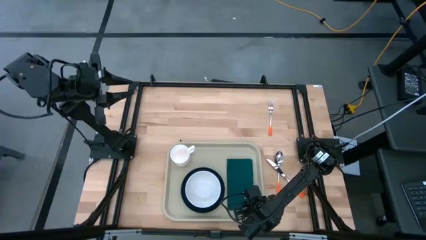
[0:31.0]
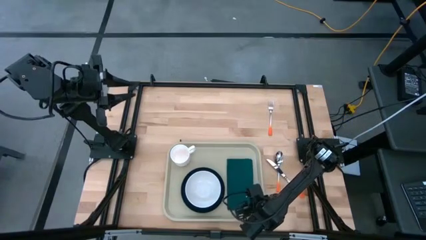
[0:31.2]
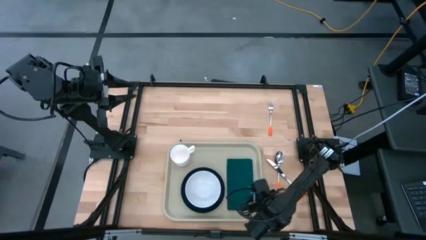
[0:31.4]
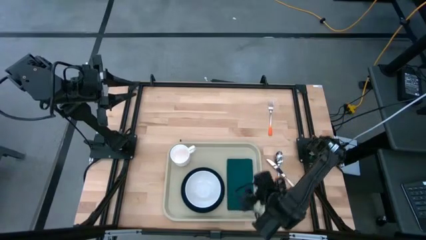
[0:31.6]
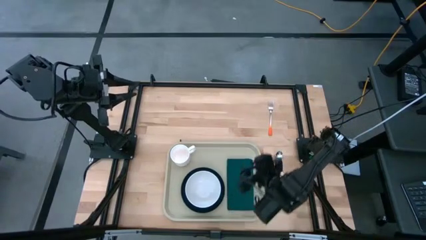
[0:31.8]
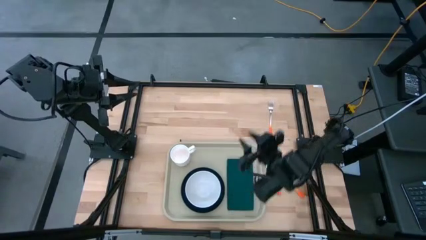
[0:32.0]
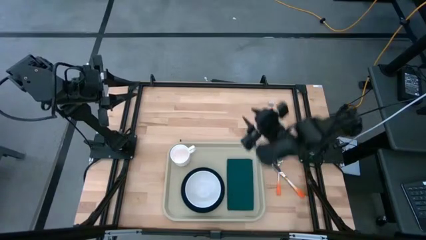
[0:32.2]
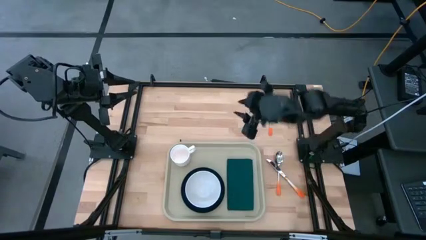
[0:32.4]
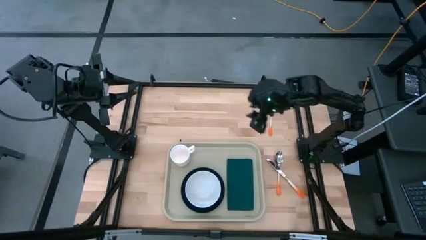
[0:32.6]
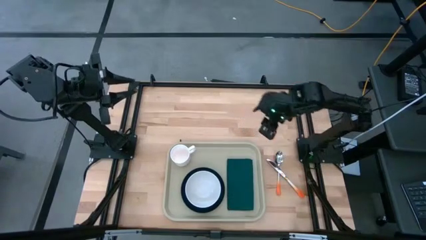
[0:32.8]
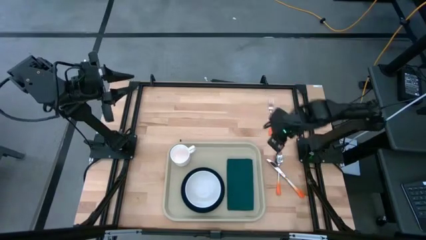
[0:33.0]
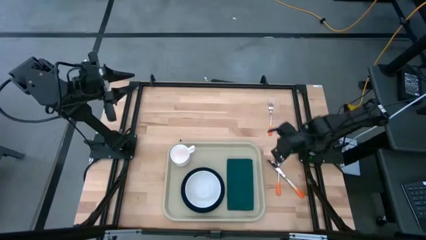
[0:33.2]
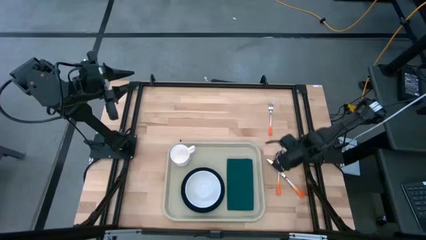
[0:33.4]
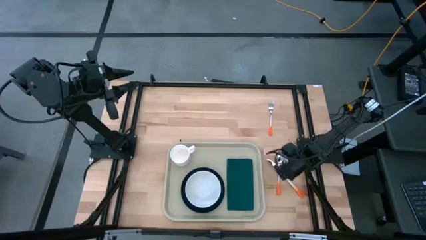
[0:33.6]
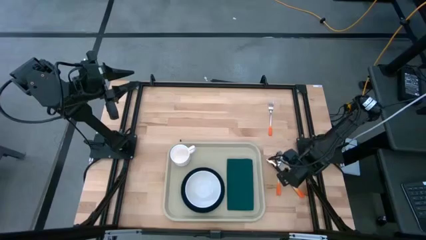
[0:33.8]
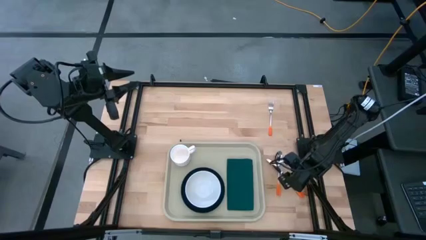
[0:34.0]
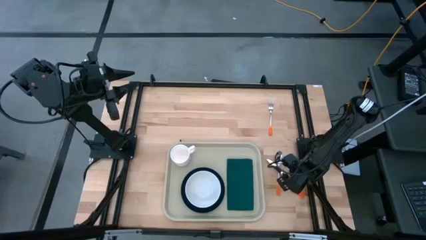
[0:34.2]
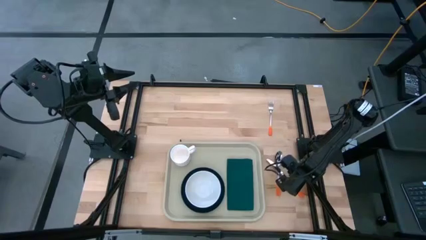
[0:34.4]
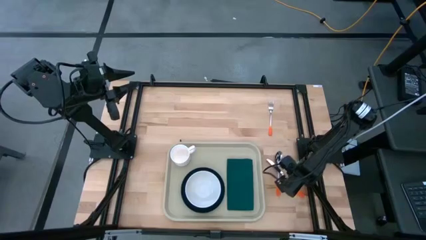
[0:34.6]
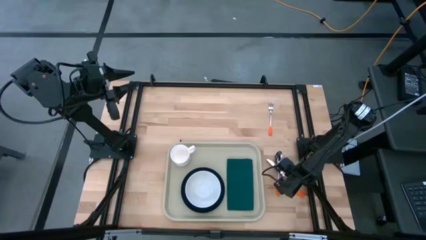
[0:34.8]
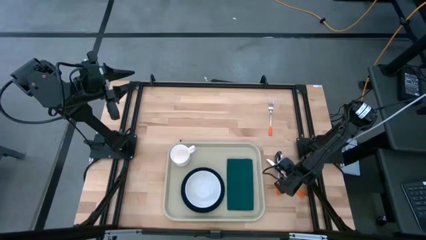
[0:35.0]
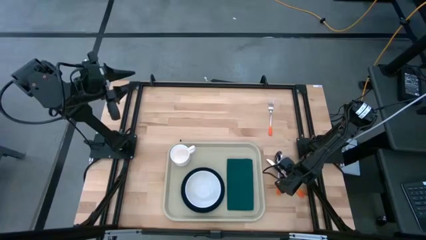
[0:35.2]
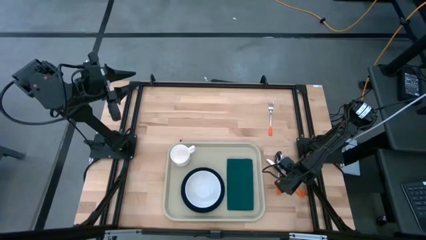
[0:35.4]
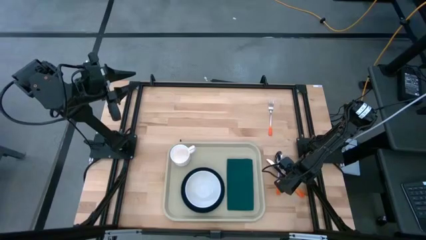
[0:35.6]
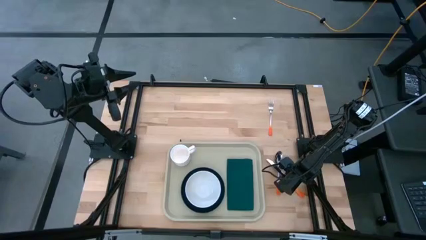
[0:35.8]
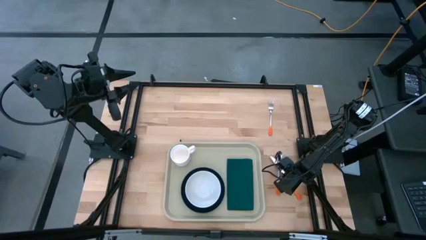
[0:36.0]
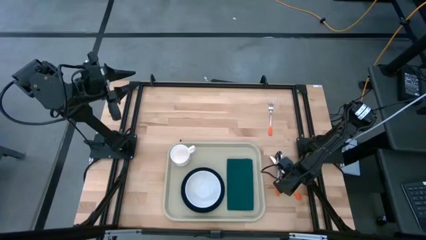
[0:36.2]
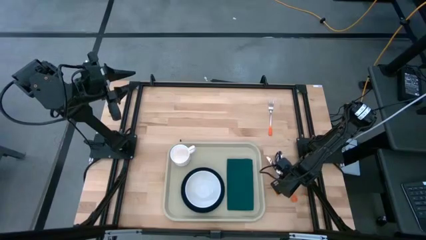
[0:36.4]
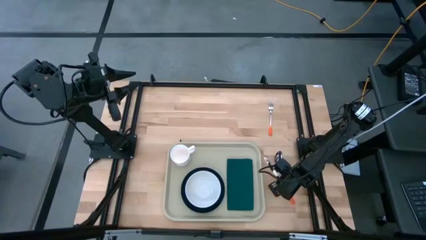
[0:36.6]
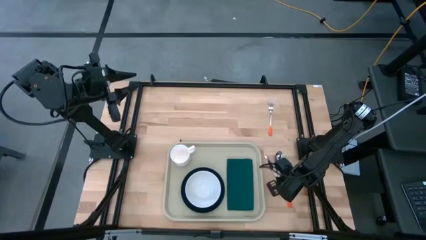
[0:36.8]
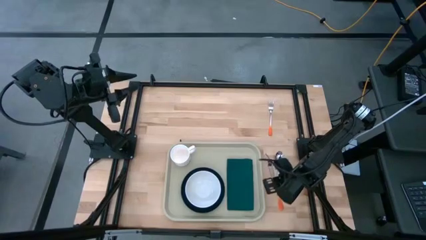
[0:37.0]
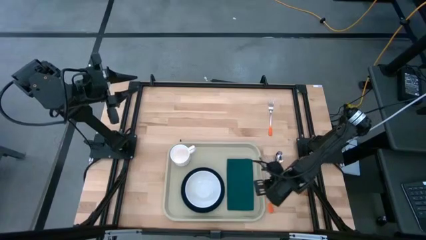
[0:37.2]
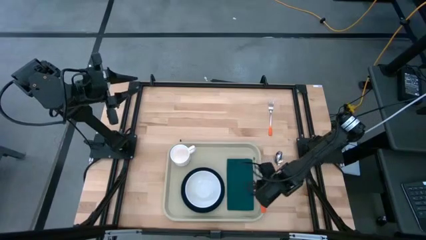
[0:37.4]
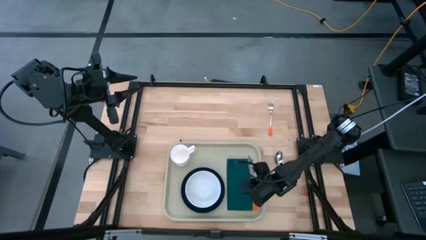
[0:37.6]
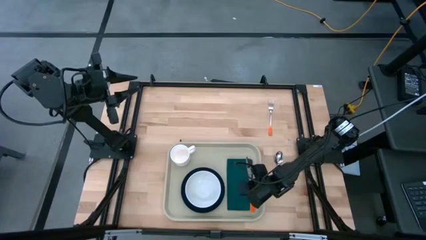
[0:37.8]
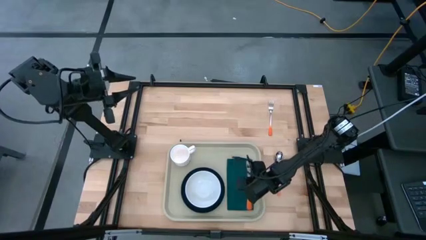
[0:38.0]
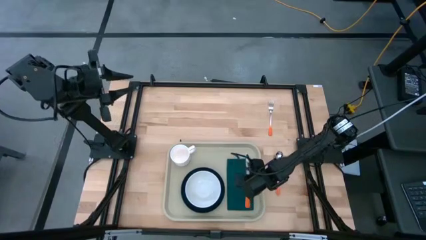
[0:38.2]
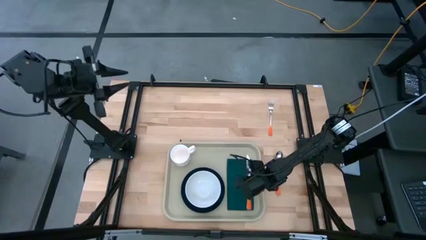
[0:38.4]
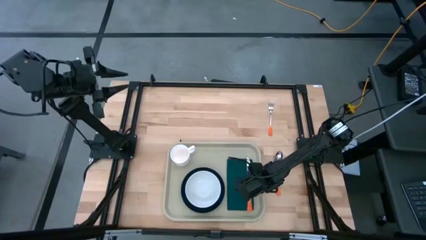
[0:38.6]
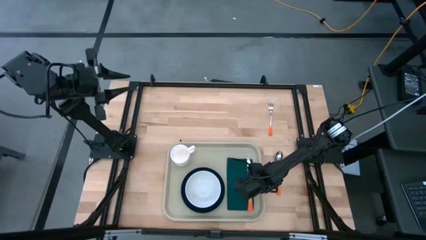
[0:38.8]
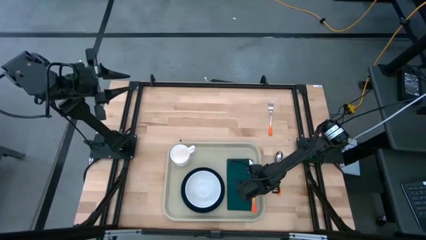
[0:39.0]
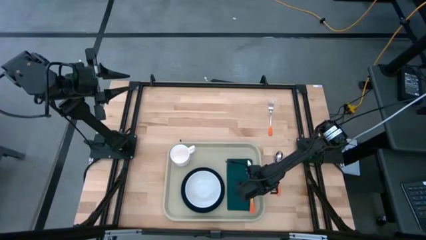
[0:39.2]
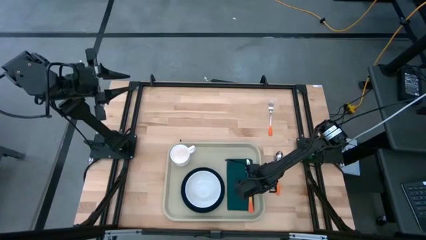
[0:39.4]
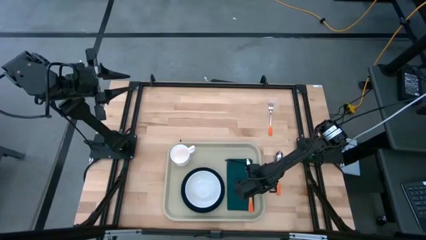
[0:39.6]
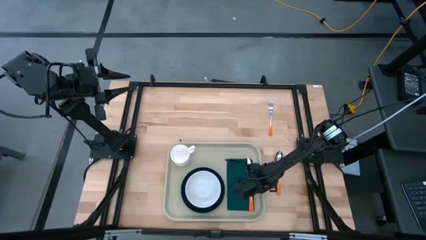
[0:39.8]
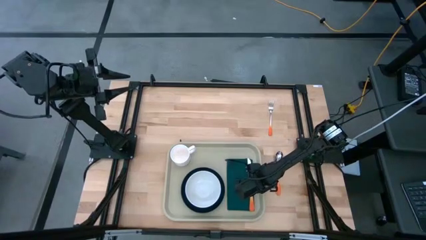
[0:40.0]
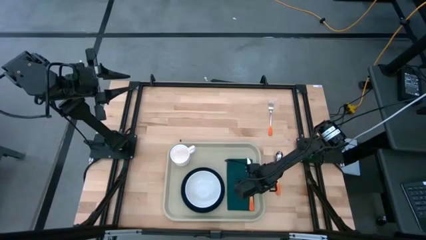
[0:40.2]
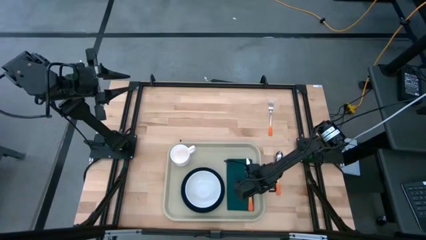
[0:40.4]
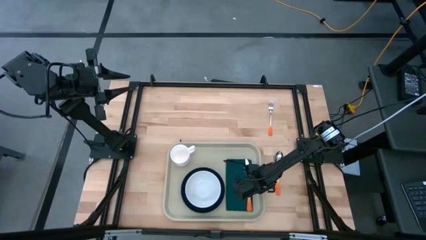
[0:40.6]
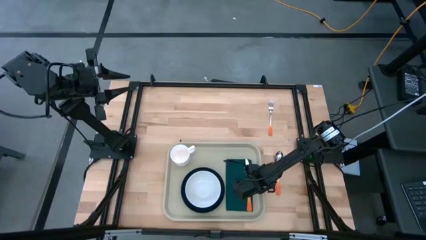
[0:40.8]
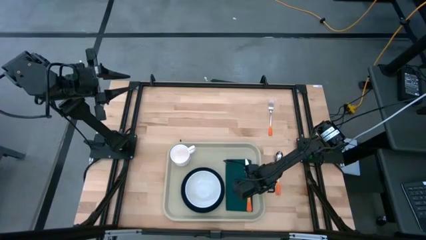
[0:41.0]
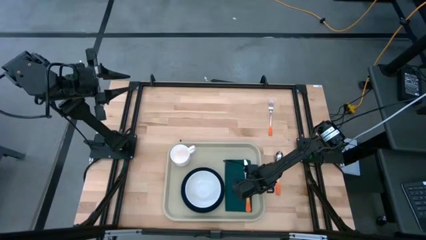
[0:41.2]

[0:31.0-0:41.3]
Task: Set up tray
Put the orange knife on top of the green napkin on the white tray

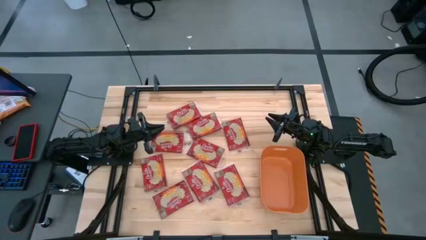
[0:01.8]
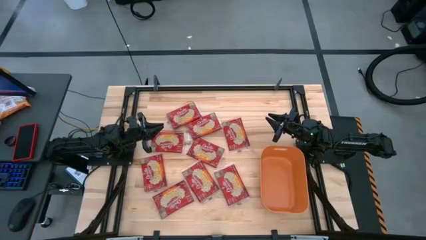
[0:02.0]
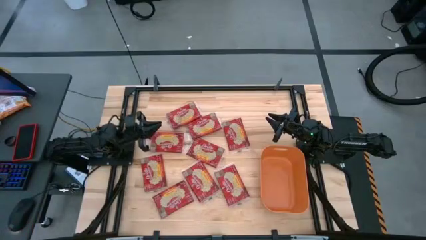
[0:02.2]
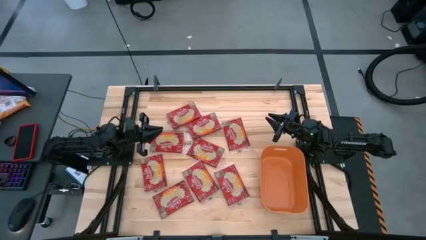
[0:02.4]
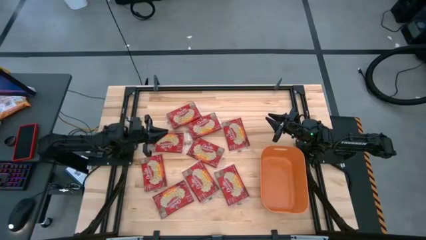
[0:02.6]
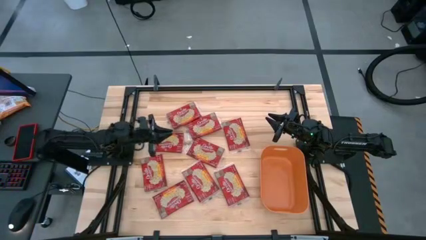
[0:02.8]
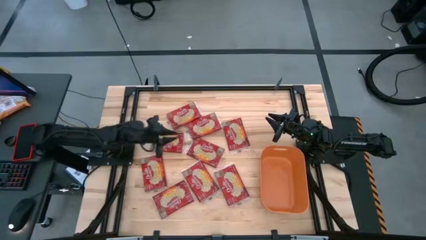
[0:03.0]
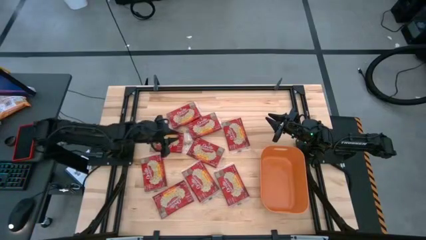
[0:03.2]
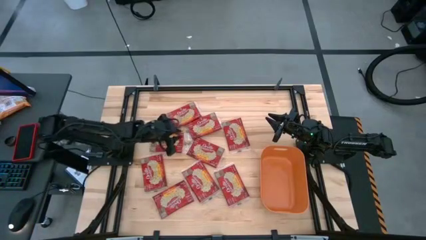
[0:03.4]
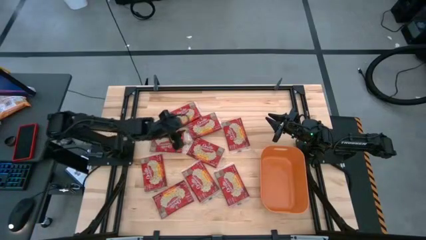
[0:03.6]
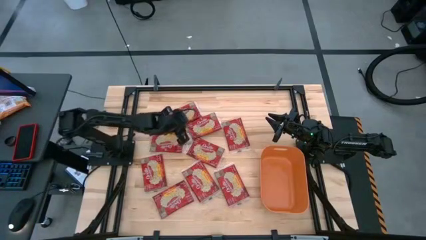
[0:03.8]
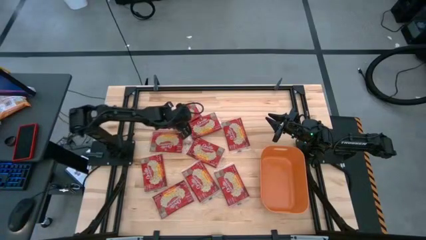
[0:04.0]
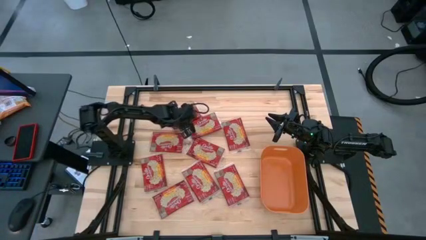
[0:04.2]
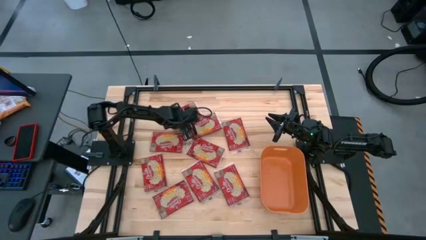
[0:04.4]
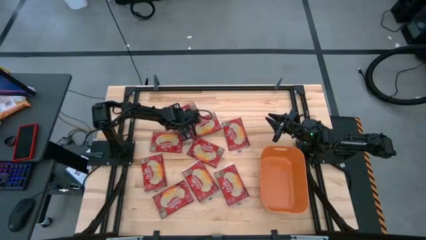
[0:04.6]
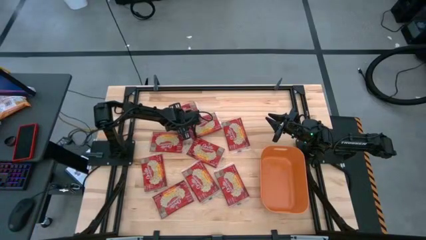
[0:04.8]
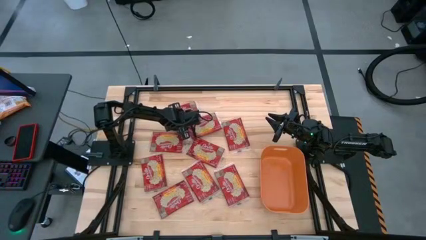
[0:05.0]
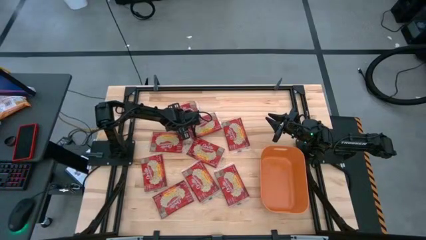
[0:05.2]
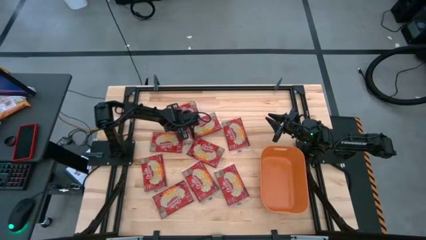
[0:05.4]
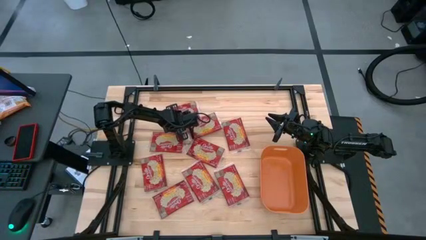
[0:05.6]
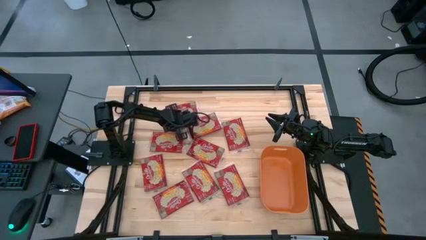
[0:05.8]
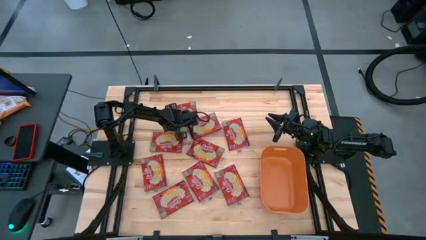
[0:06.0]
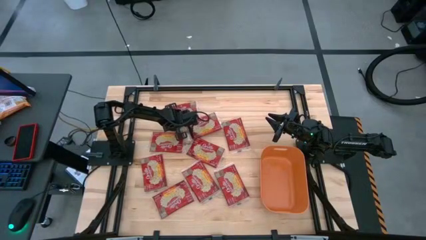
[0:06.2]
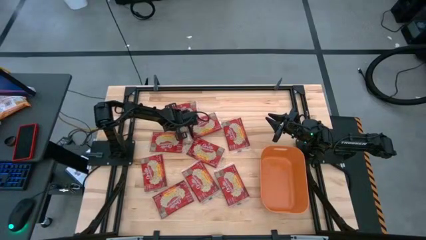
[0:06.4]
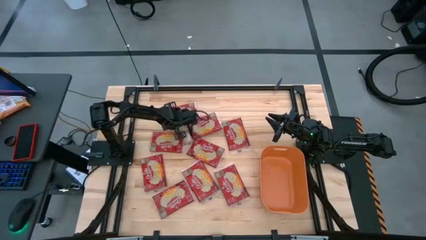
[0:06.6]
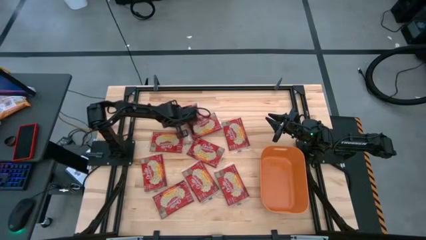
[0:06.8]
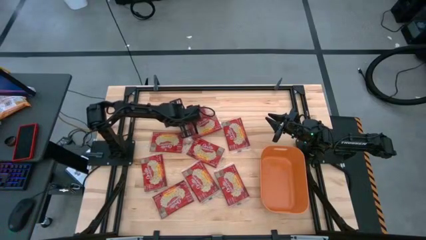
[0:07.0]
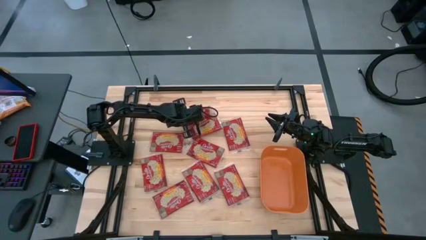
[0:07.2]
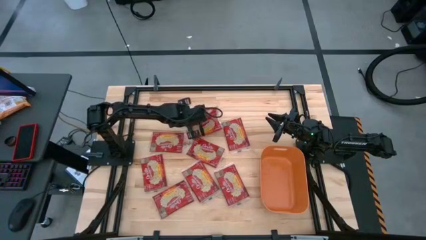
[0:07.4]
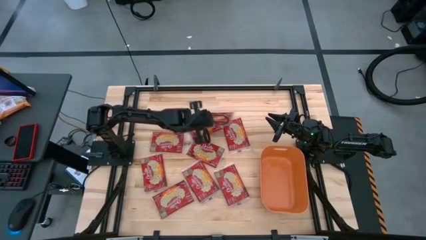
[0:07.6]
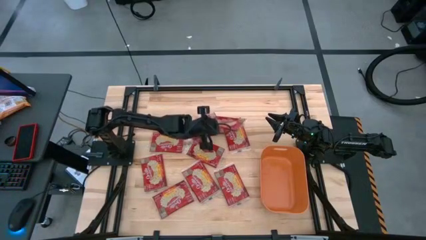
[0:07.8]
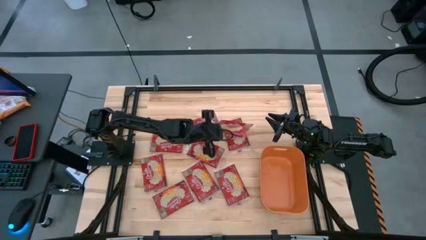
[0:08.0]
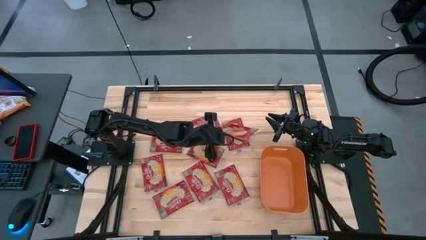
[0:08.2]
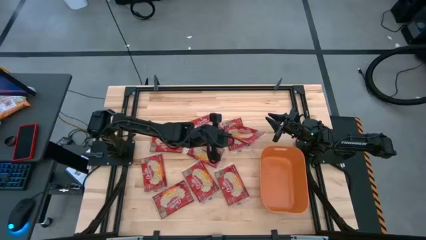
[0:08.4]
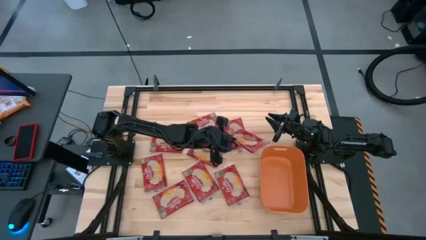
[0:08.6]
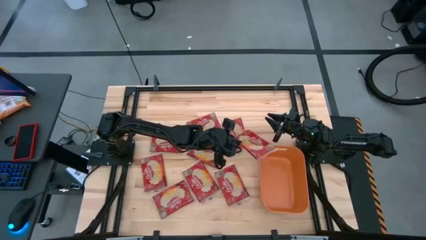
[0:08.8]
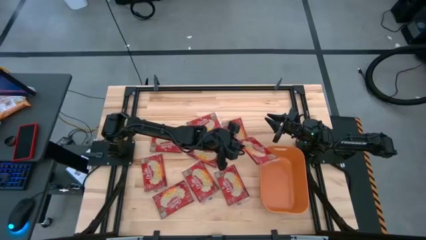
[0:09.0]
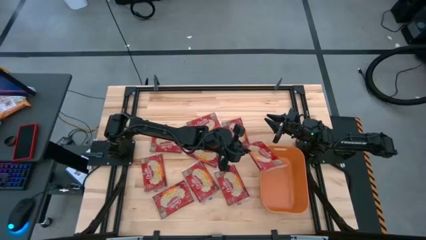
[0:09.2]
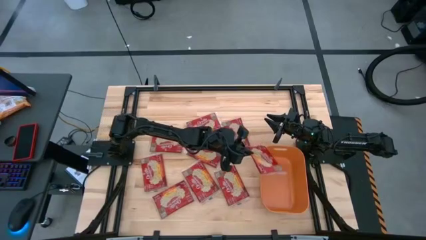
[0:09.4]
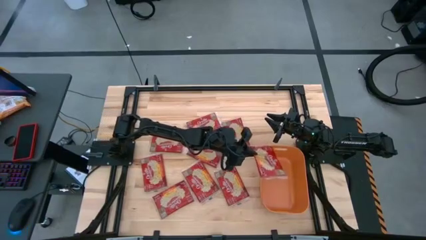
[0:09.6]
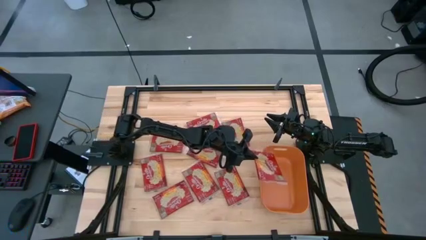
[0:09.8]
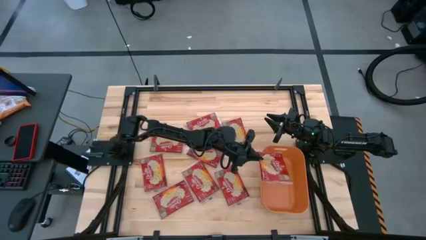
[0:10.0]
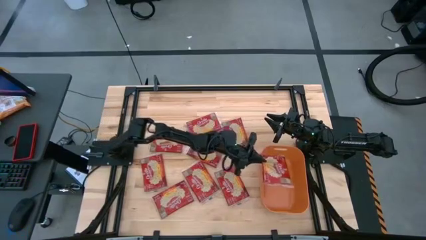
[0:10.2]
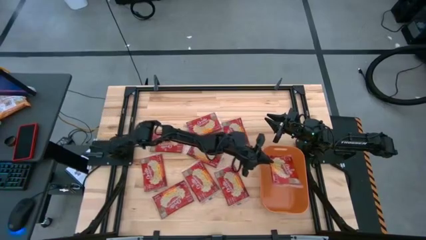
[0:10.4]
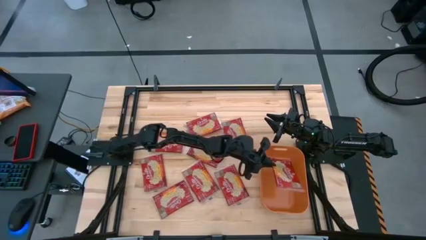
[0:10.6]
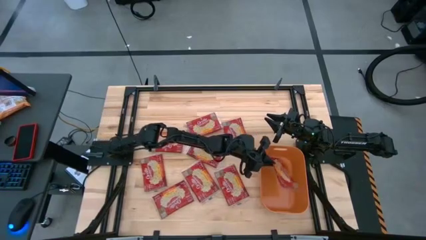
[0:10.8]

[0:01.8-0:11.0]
Task: Sort popcorn bags into baskets
Put the red popcorn bag into the orange bin
